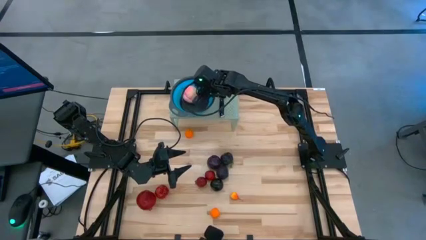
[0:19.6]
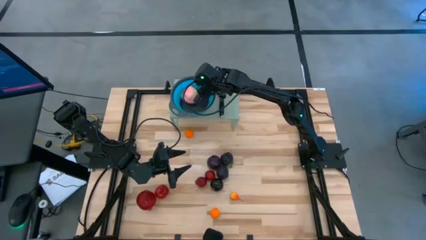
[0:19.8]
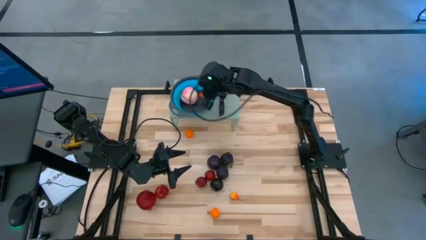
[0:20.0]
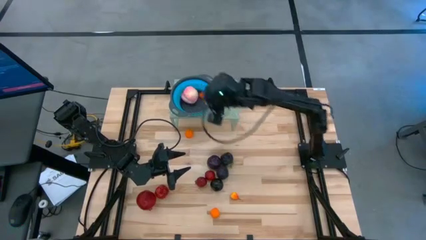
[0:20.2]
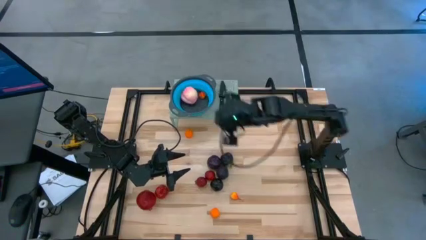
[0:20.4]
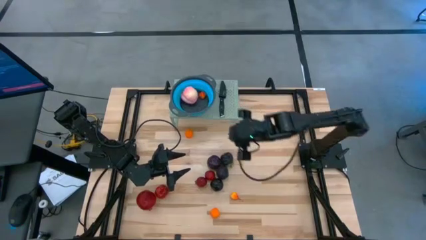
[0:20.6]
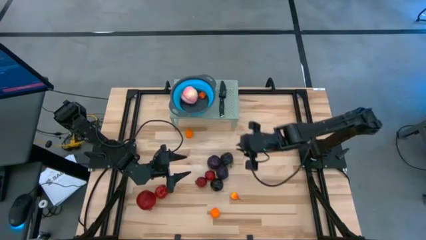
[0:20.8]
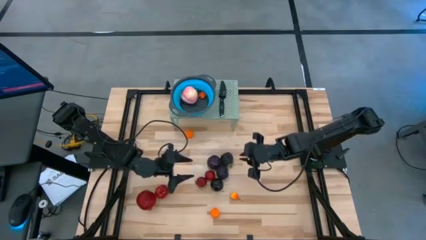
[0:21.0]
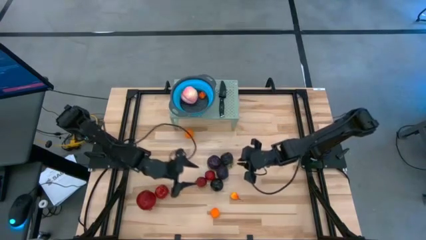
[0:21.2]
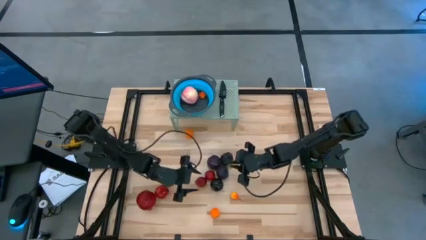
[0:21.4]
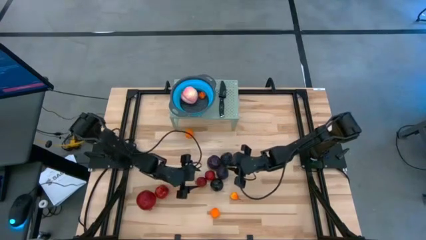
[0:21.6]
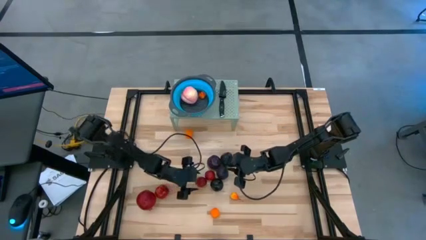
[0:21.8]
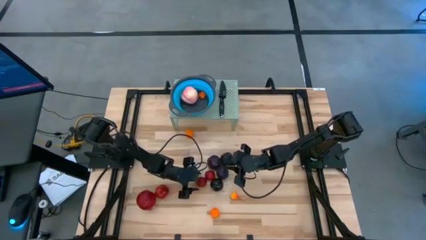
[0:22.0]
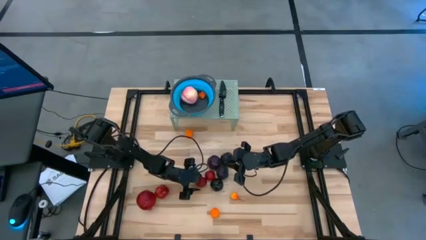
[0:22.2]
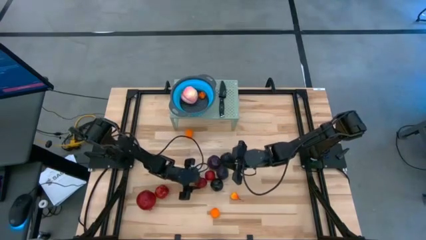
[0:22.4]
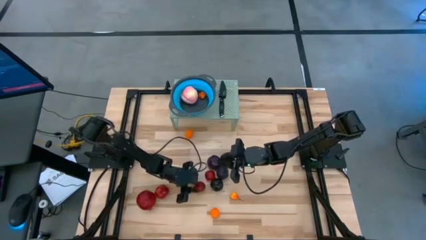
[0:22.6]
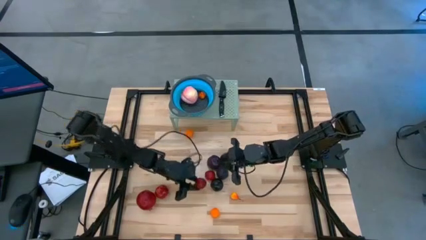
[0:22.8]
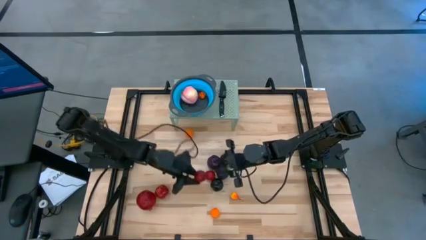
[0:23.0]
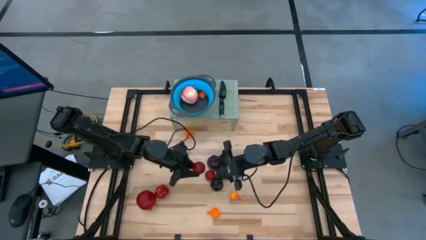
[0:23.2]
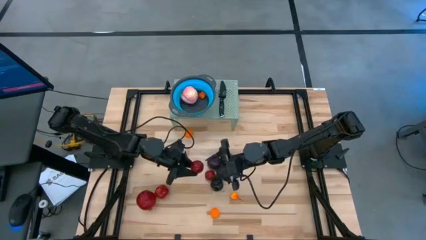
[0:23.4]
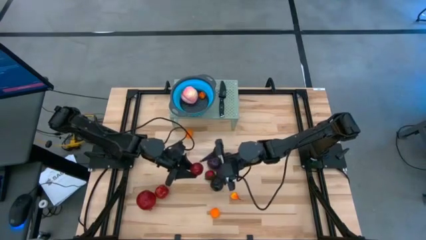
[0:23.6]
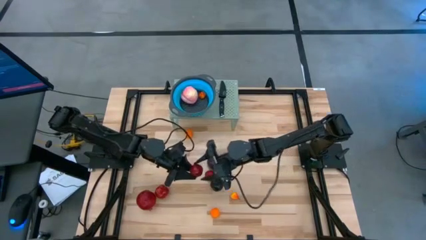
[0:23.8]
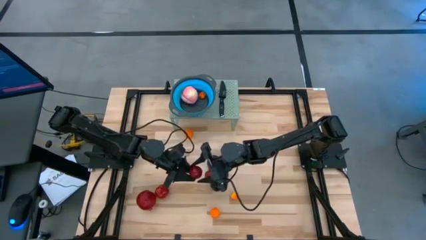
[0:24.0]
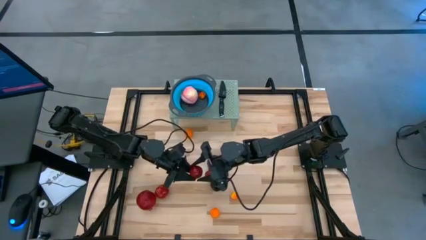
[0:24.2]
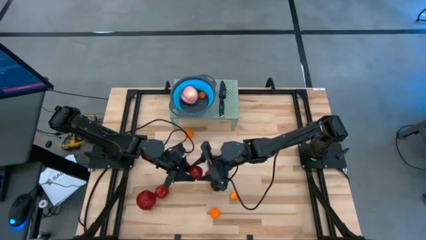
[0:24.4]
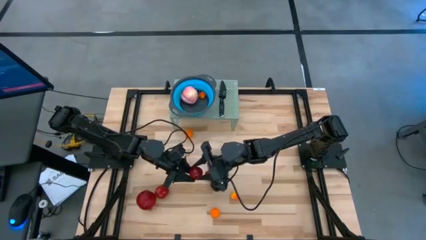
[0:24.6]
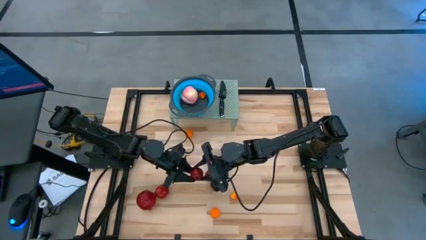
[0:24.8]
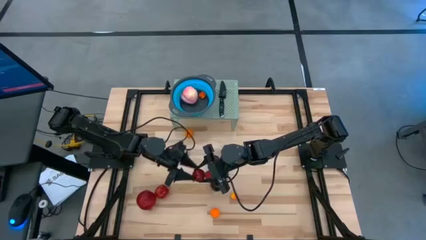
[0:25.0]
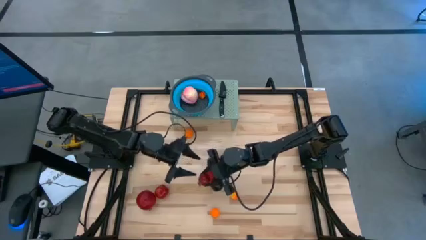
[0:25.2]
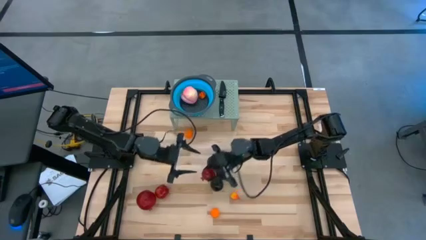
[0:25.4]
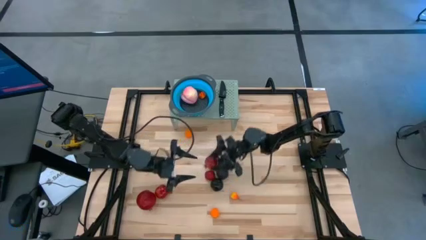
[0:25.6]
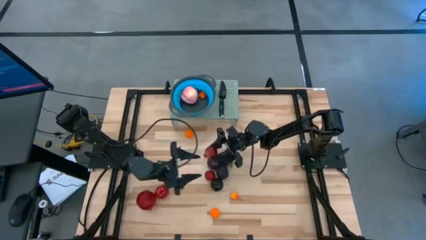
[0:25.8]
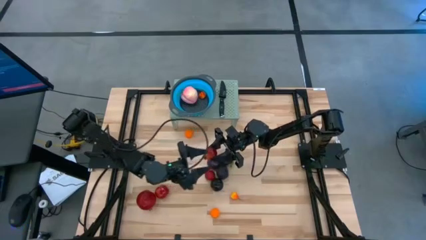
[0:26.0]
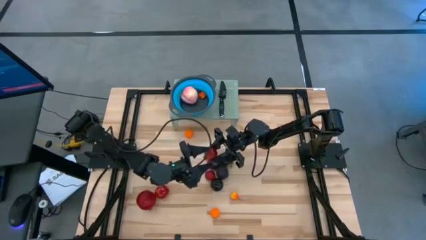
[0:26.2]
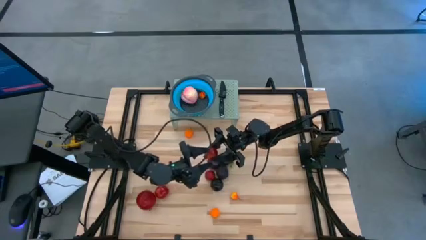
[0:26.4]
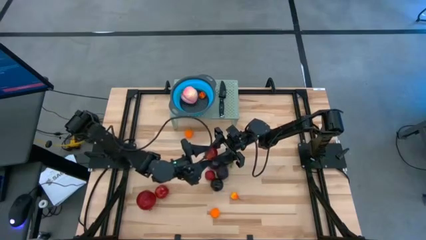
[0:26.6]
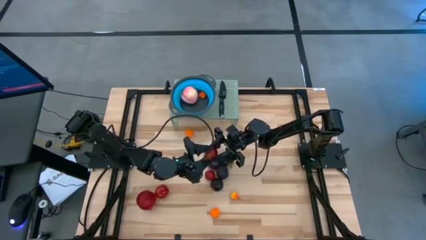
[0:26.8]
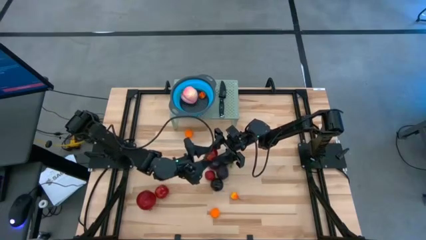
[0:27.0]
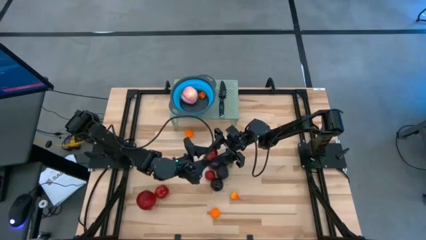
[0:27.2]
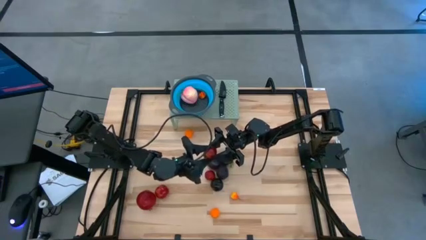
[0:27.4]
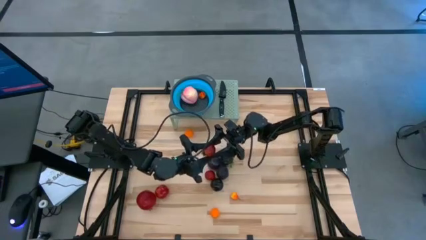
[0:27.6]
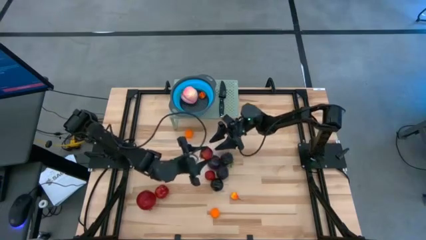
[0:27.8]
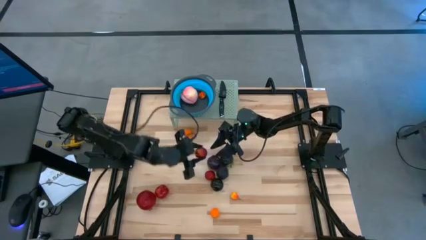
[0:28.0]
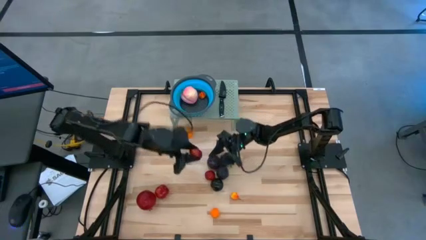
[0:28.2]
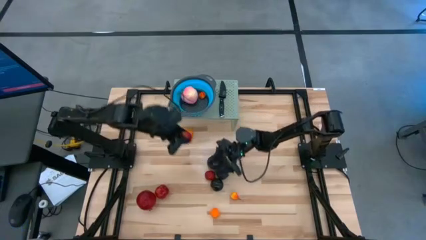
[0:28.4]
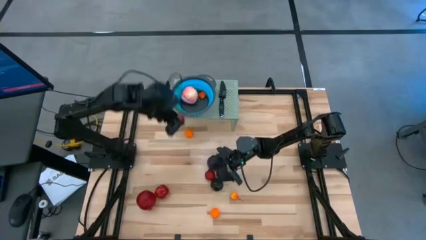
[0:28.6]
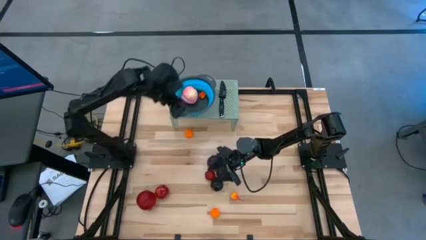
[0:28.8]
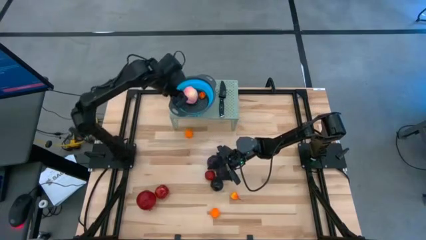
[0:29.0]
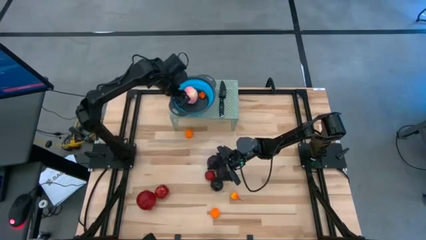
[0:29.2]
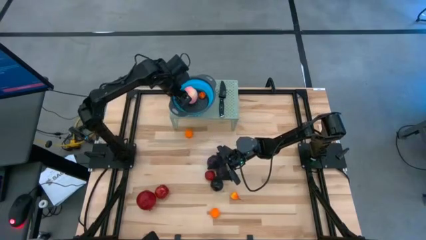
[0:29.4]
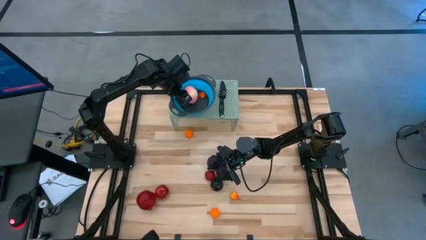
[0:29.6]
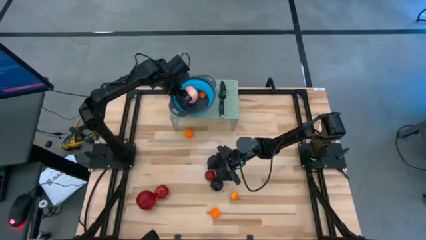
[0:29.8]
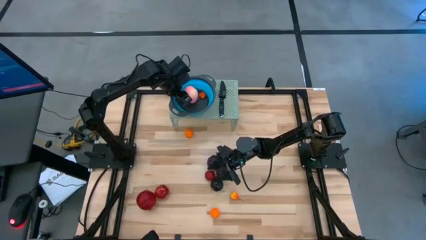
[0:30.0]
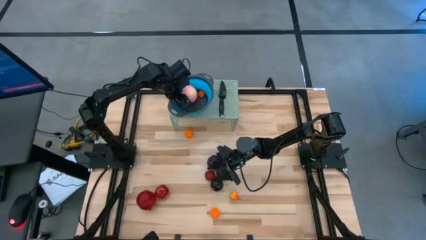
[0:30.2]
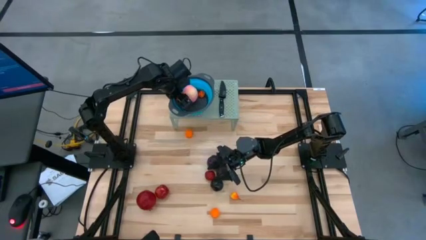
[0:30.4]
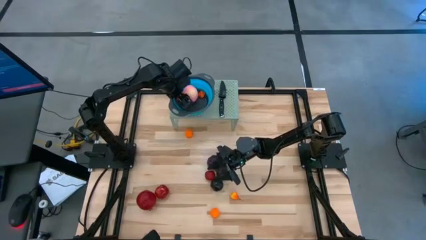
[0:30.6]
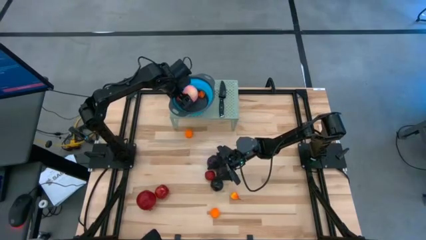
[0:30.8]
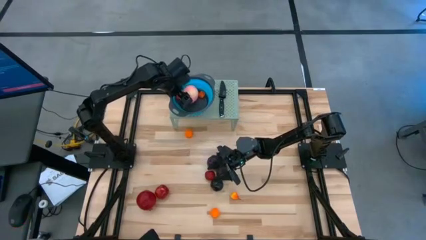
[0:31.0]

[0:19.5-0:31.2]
Task: Pick & Place Fruit
Put the red pomegranate into the blue strainer bowl
